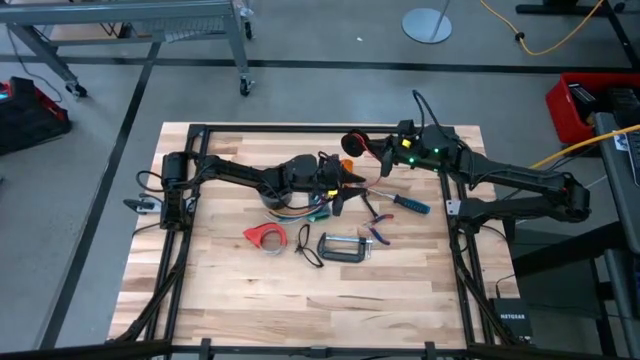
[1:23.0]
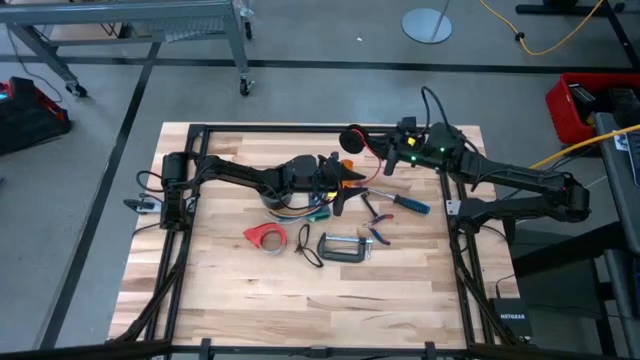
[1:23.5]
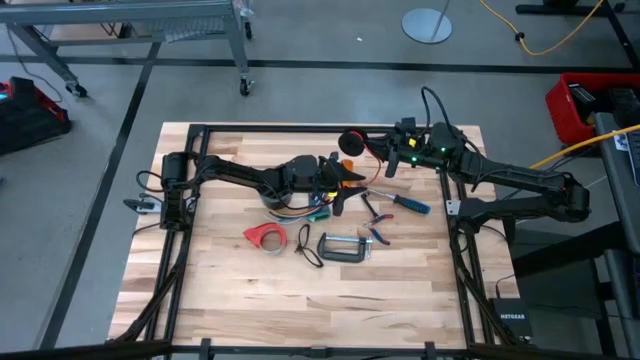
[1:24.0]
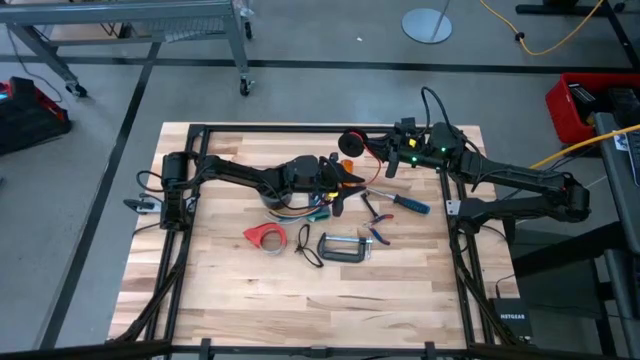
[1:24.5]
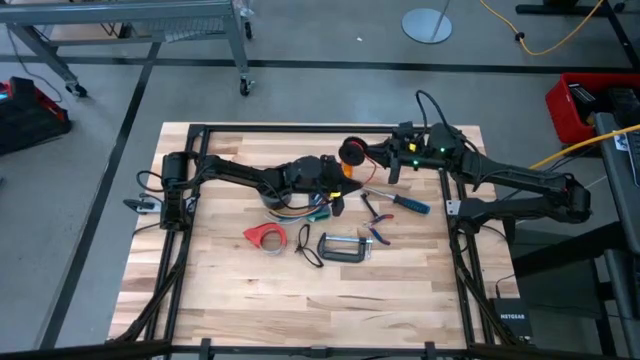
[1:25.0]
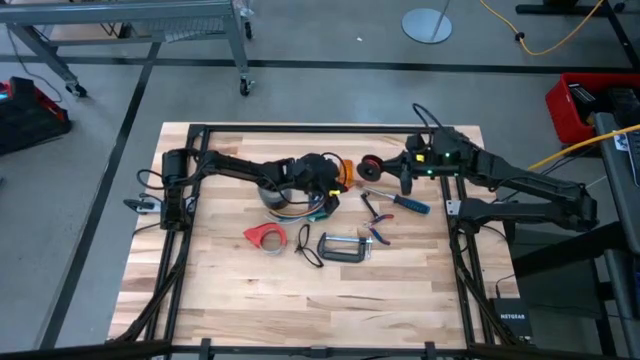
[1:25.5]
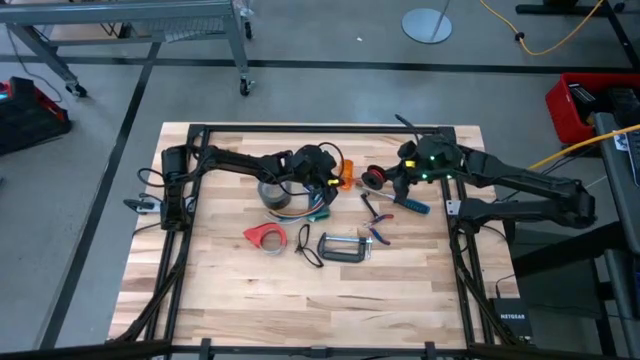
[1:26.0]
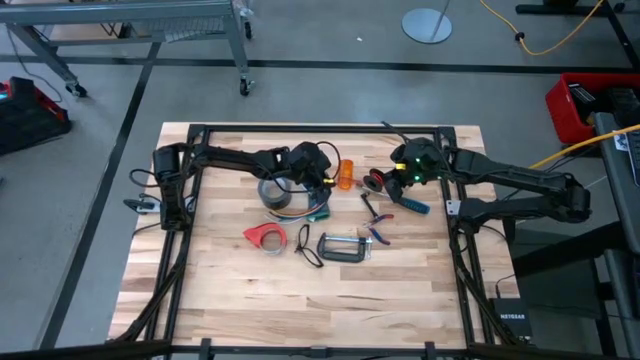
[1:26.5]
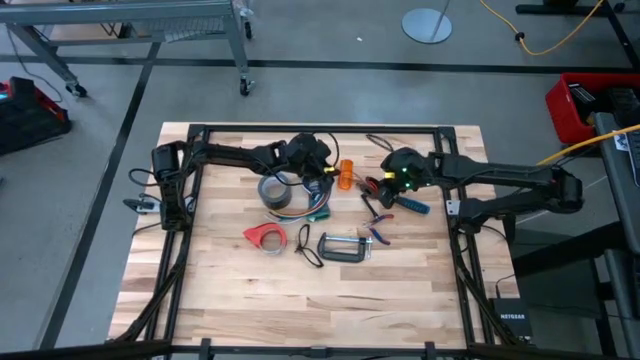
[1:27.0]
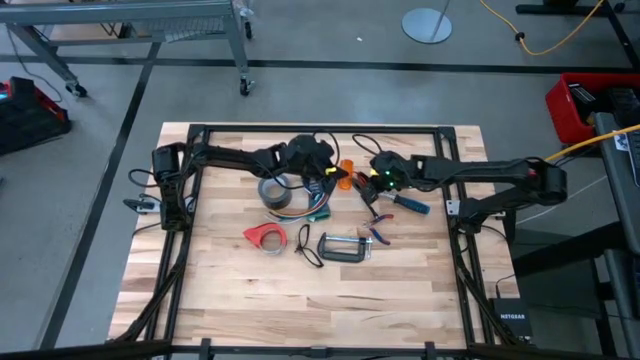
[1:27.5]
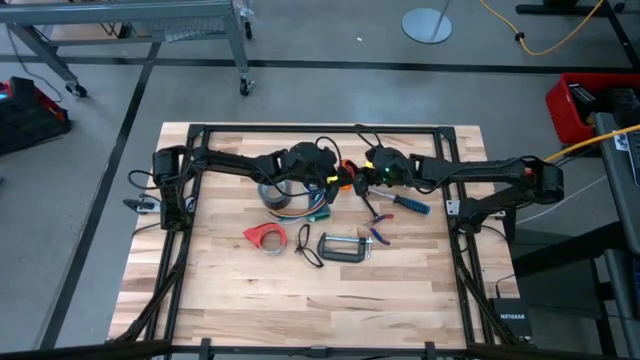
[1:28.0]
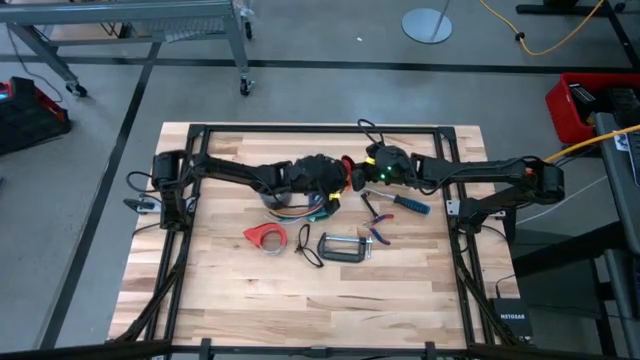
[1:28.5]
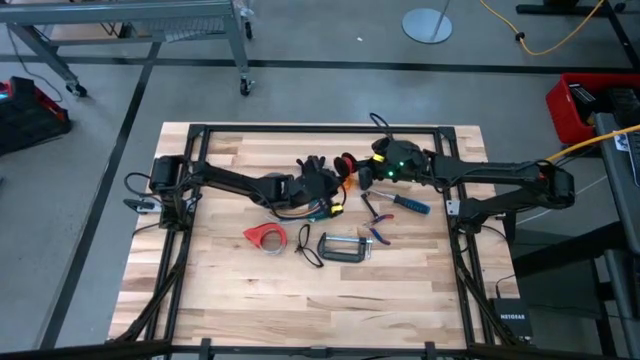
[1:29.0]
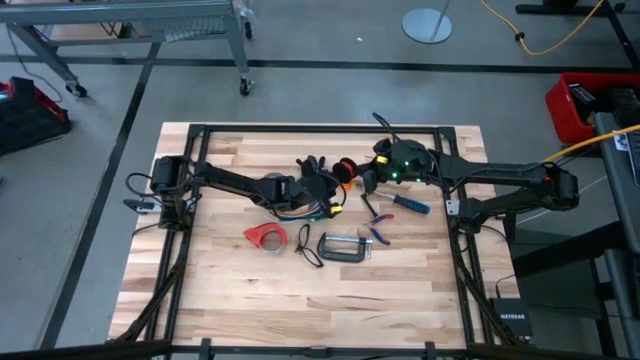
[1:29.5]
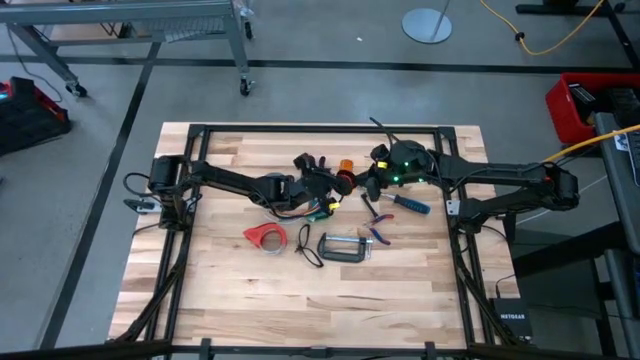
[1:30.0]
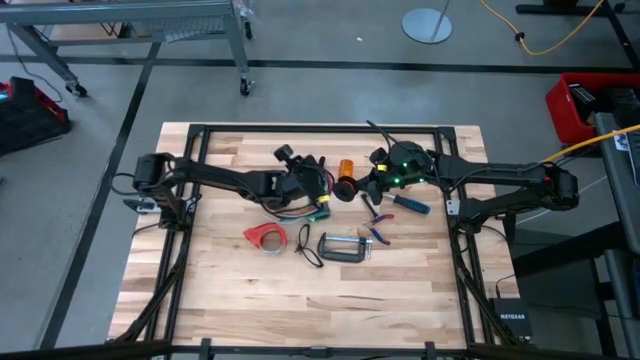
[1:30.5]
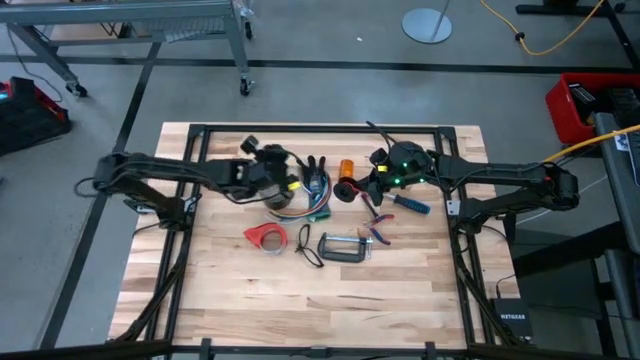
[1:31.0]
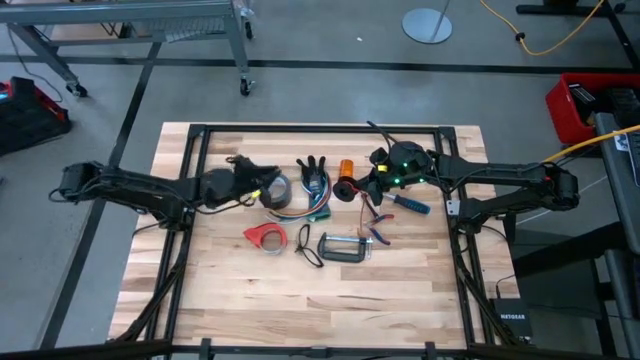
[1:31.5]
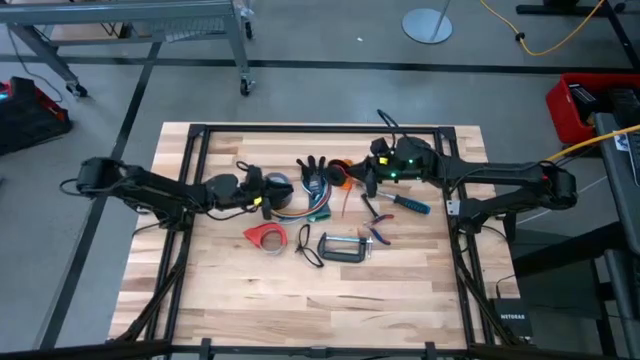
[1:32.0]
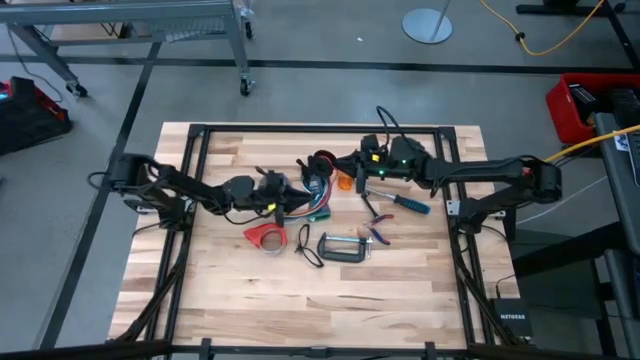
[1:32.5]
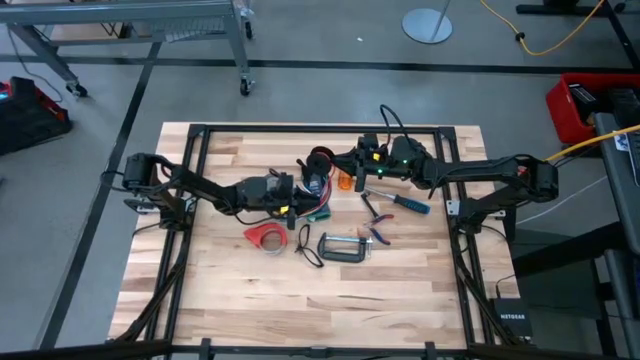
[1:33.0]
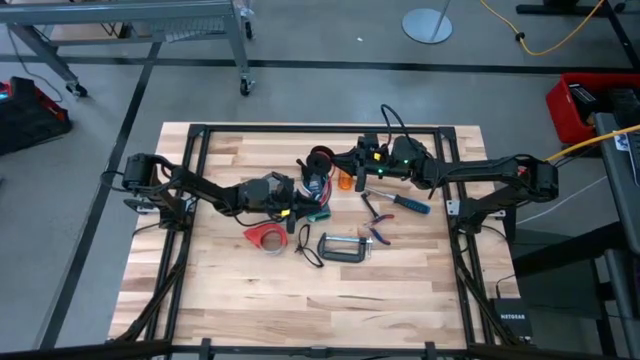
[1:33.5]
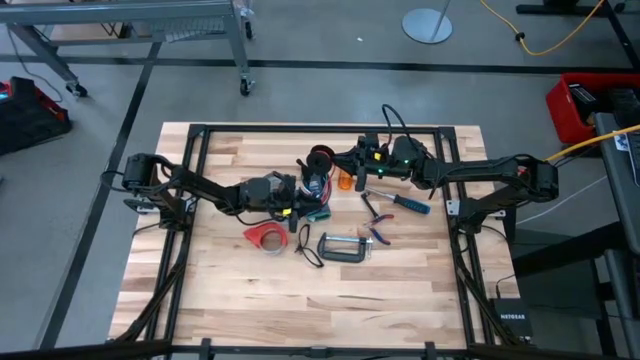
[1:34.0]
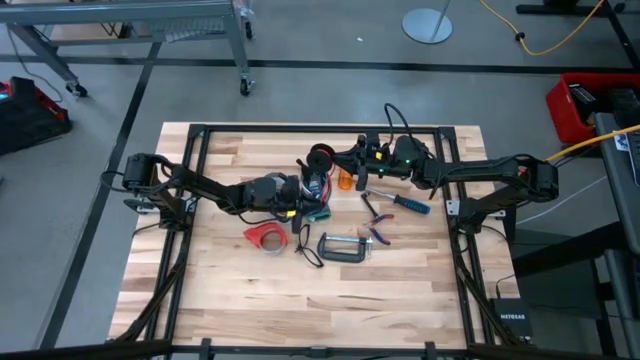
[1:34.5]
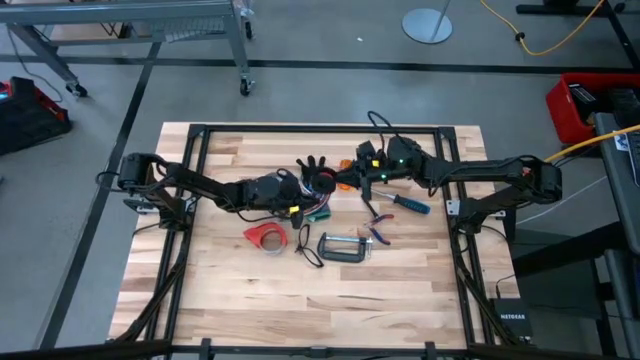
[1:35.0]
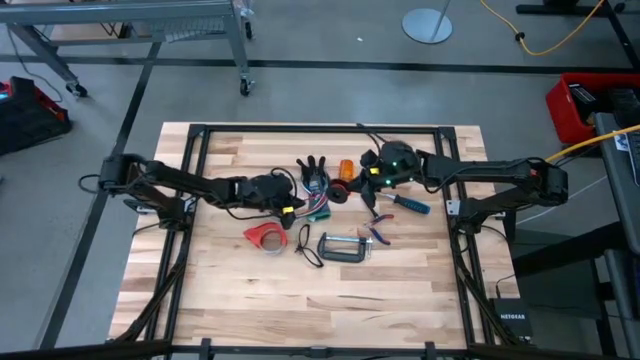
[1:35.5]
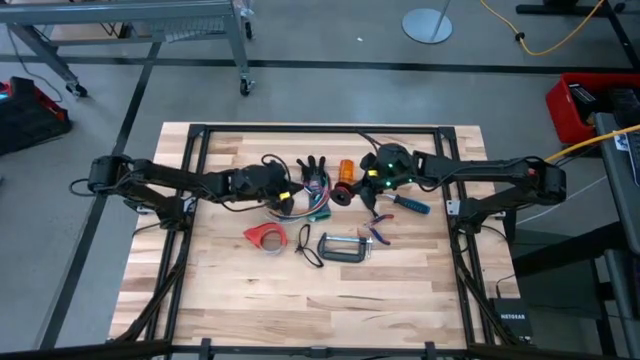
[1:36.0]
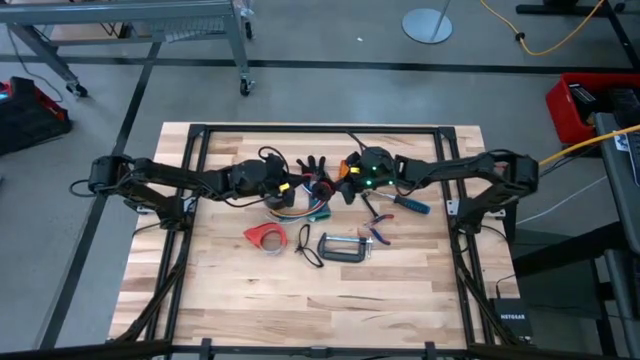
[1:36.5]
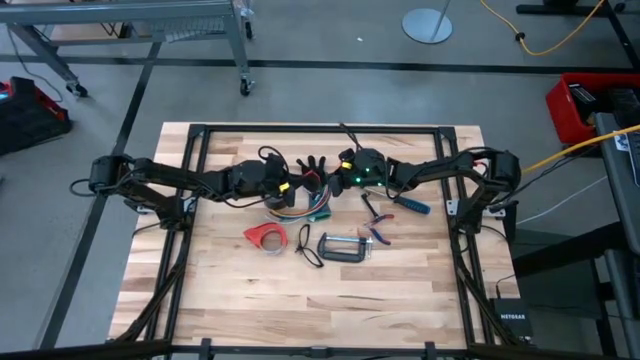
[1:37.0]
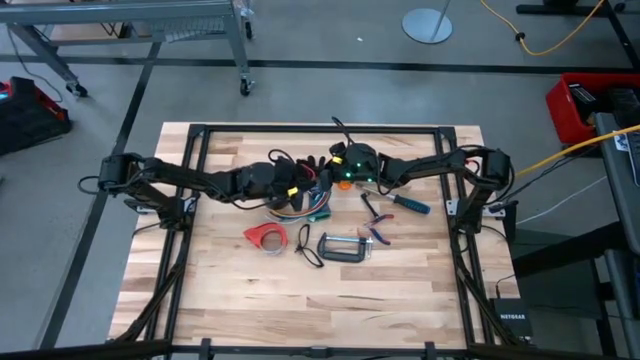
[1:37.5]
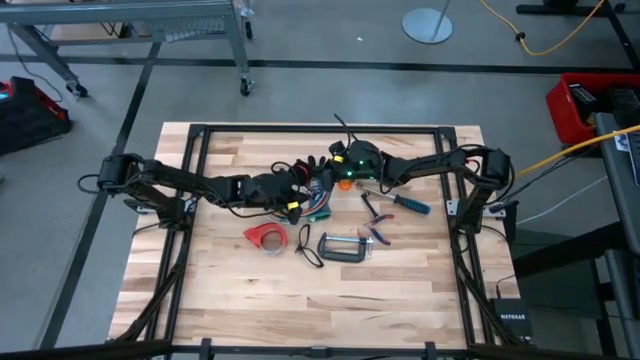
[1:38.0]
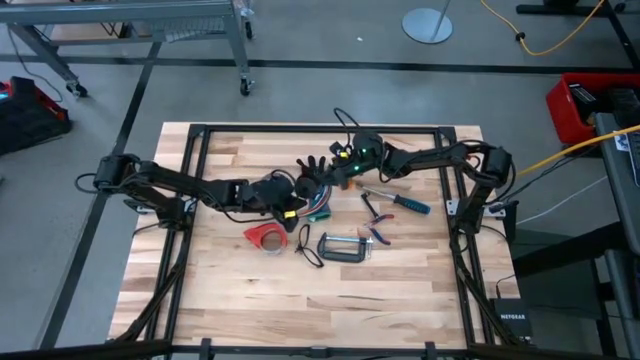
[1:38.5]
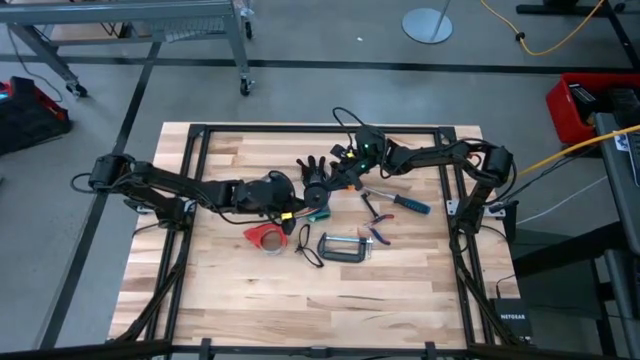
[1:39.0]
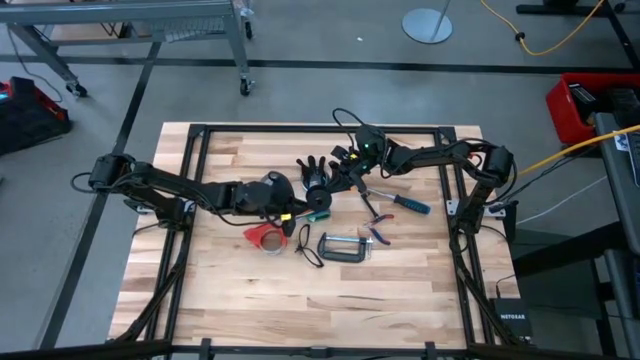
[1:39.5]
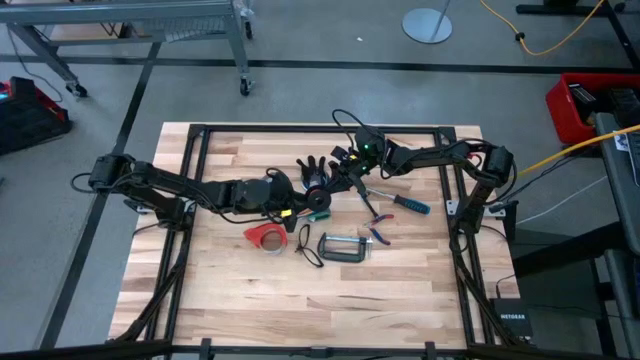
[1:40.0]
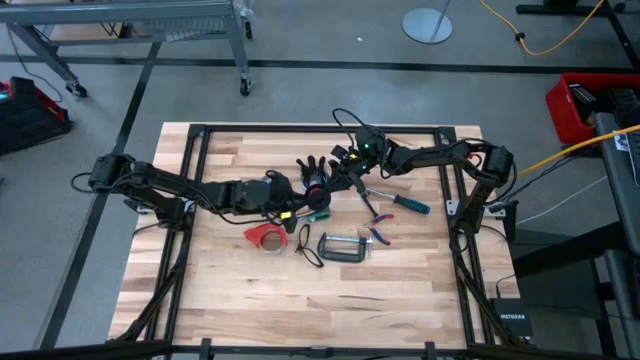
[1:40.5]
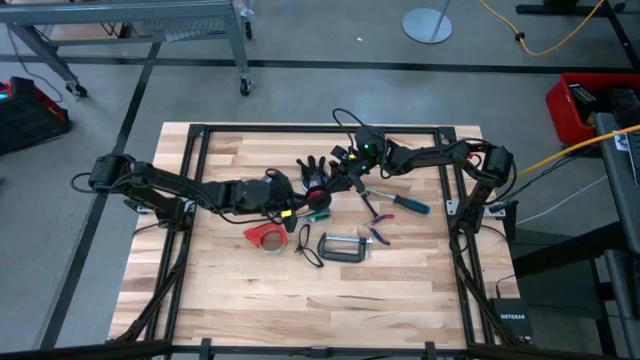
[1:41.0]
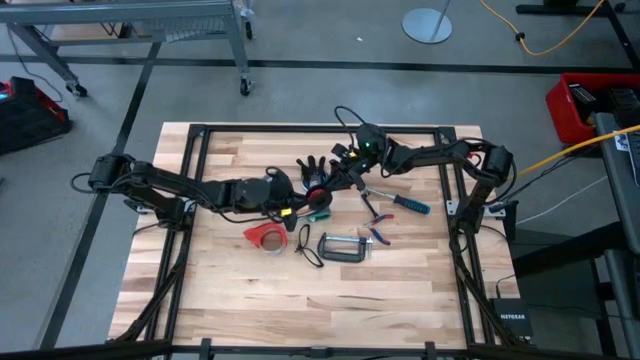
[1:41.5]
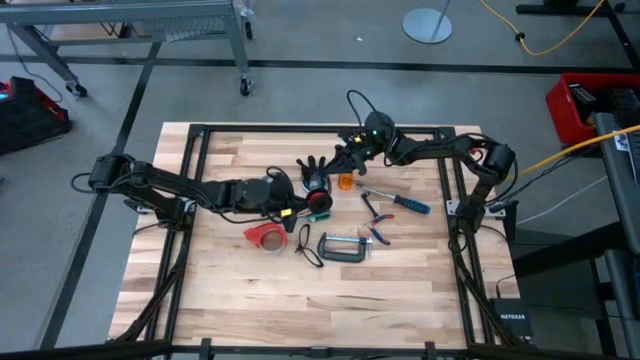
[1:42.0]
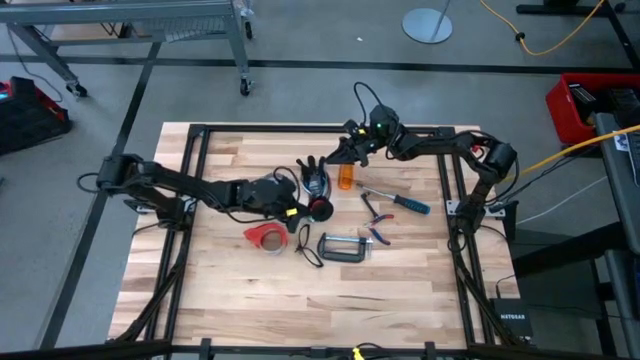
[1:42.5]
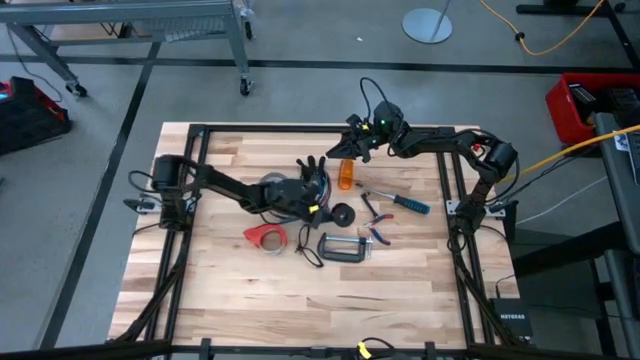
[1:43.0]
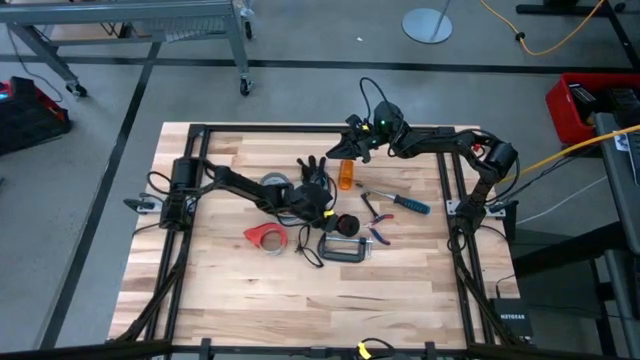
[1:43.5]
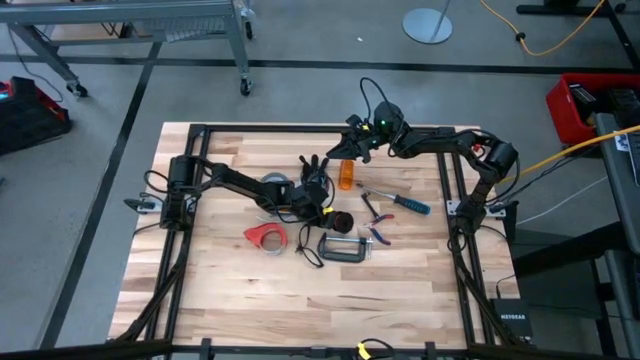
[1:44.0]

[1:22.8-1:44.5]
Task: Coil cords
Coil the red wire
